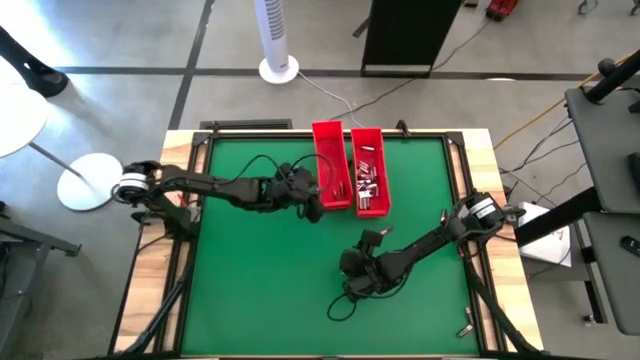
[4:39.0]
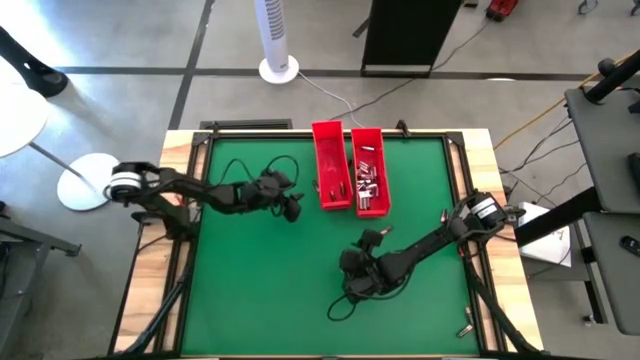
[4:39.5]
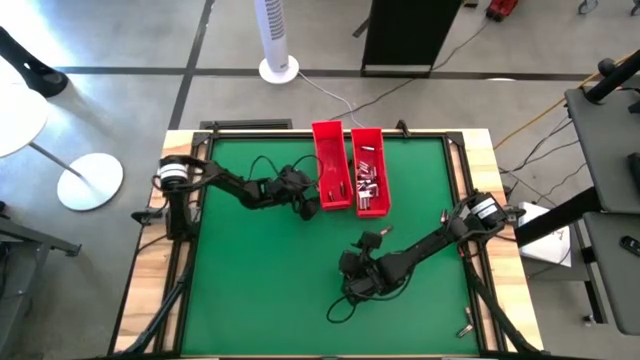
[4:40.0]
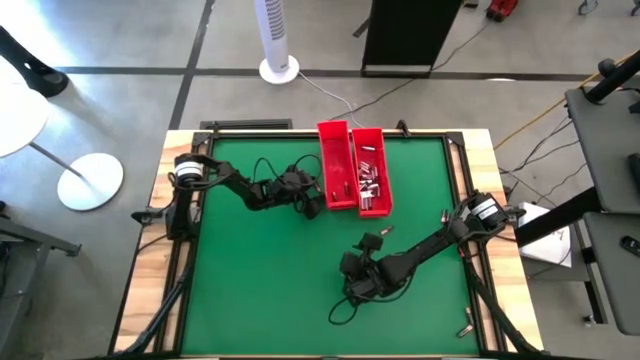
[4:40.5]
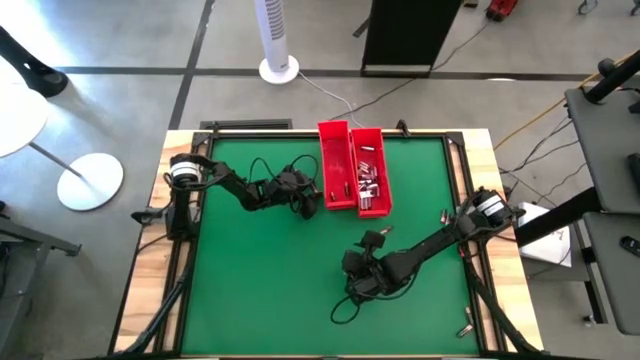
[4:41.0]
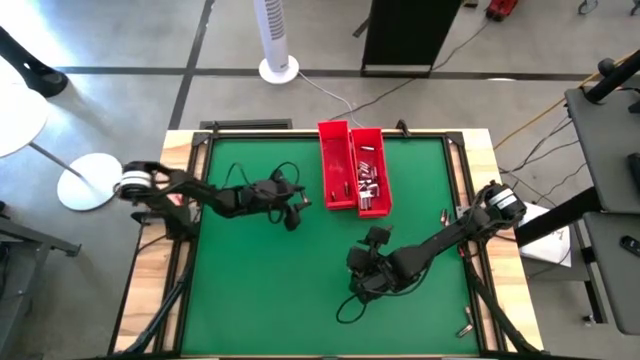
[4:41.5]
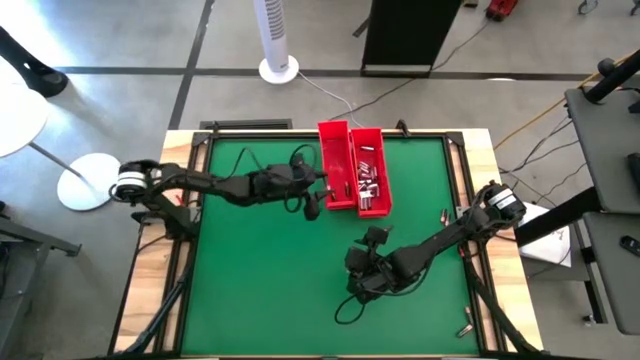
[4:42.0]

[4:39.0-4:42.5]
Task: Sort batteries
Put the black battery into the left red bin

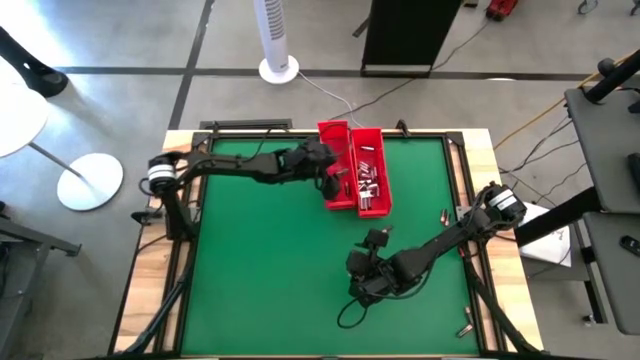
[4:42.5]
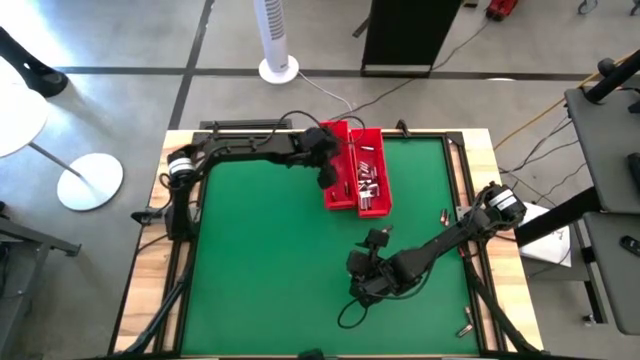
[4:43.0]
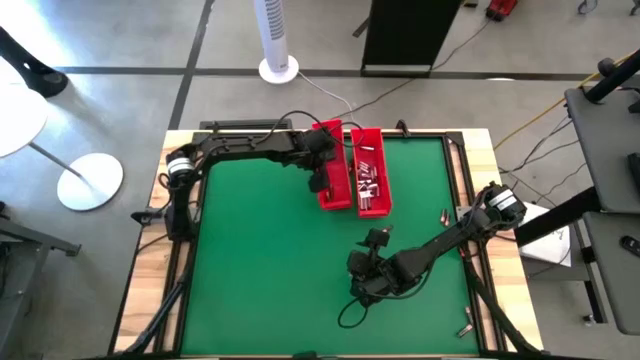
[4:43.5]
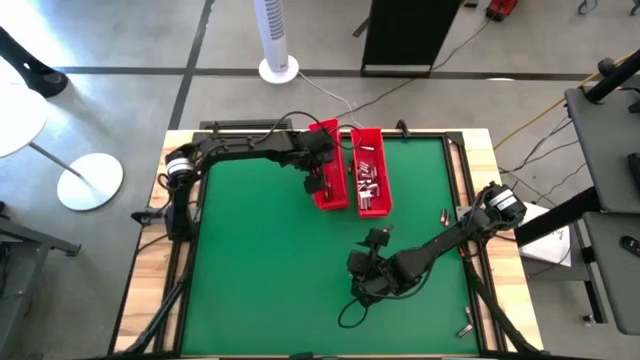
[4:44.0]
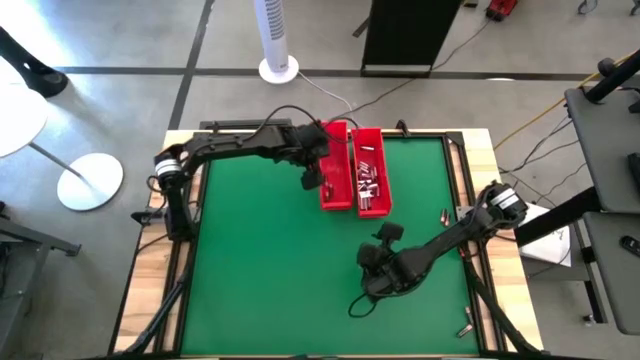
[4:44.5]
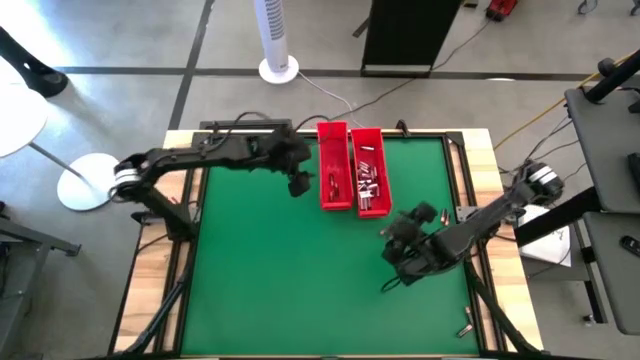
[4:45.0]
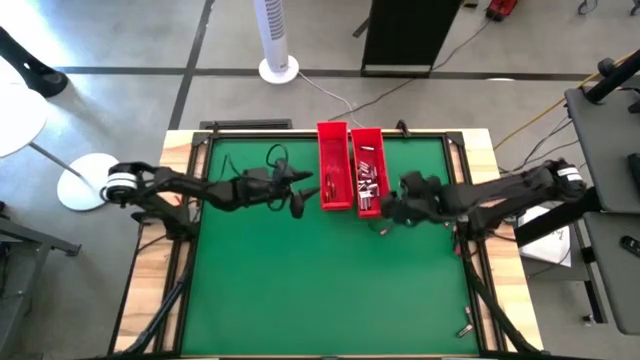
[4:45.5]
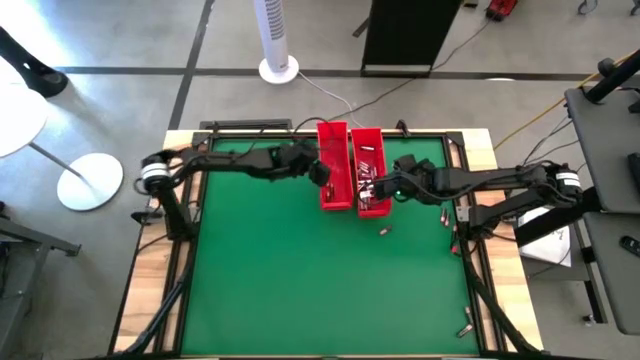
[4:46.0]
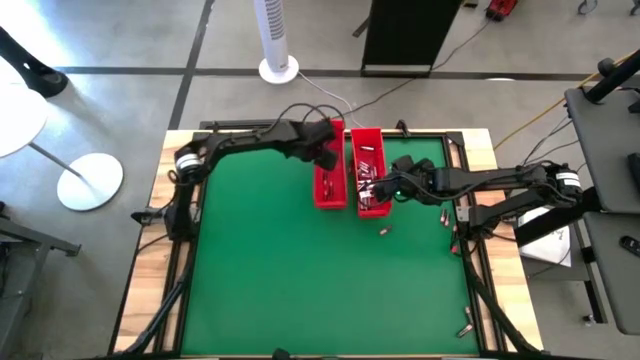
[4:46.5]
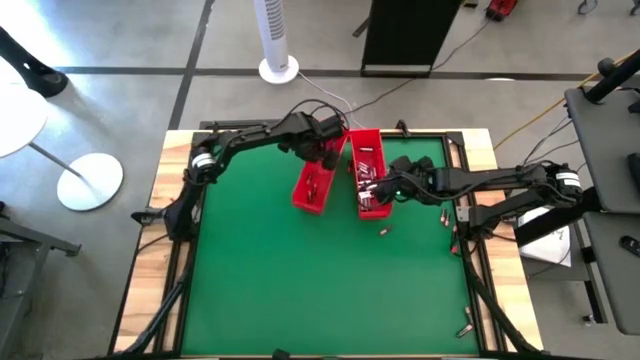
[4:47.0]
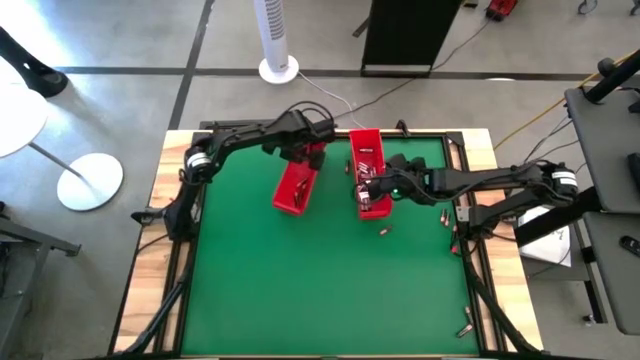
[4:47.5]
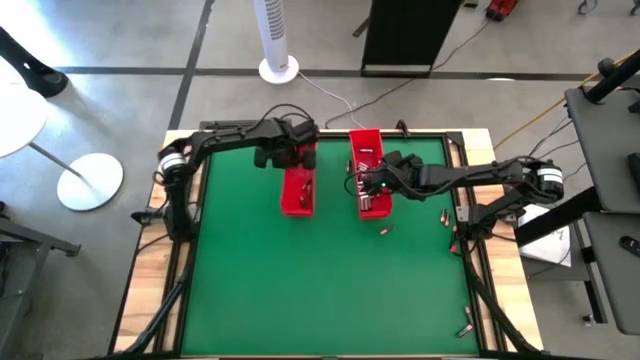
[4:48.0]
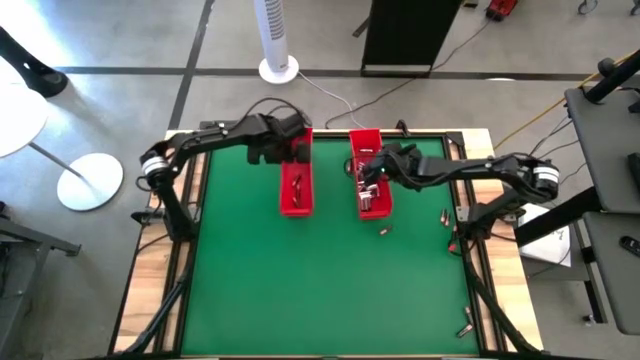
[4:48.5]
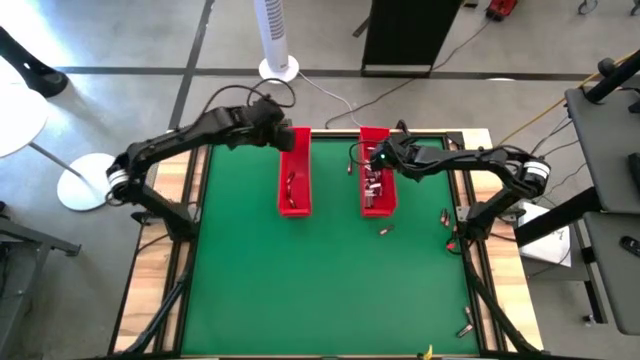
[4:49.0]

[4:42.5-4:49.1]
Adjust the bins

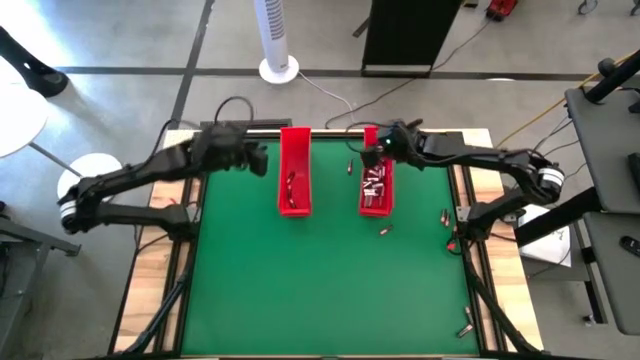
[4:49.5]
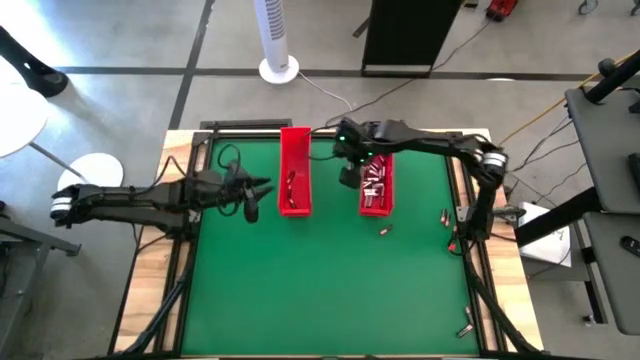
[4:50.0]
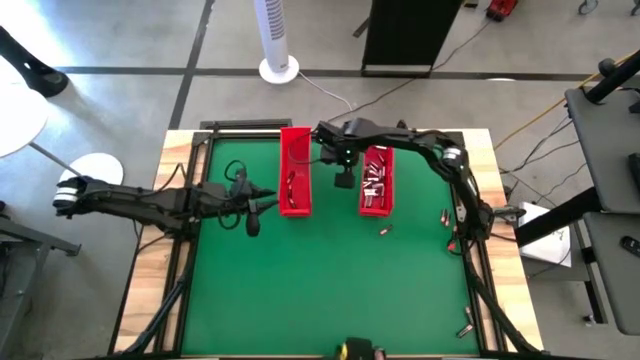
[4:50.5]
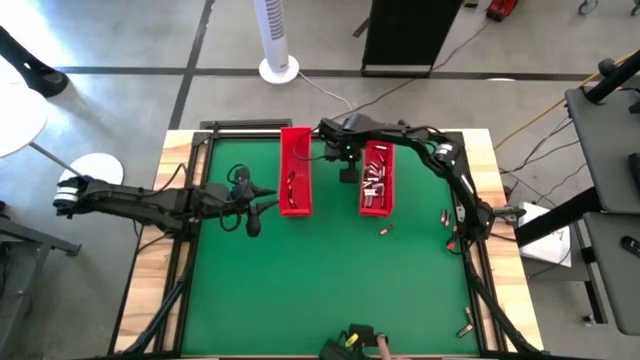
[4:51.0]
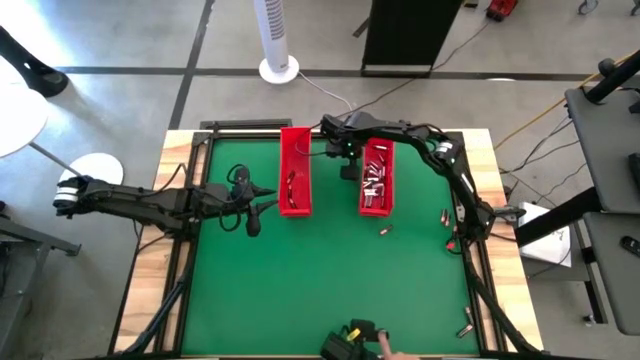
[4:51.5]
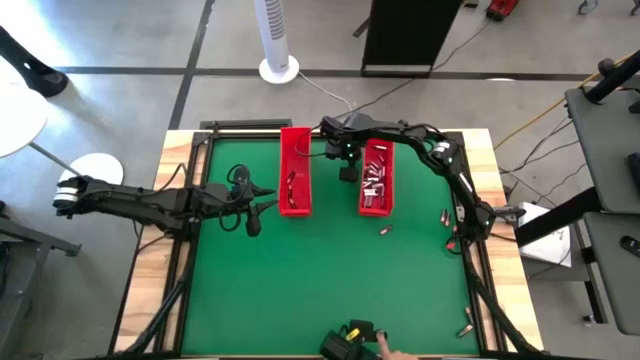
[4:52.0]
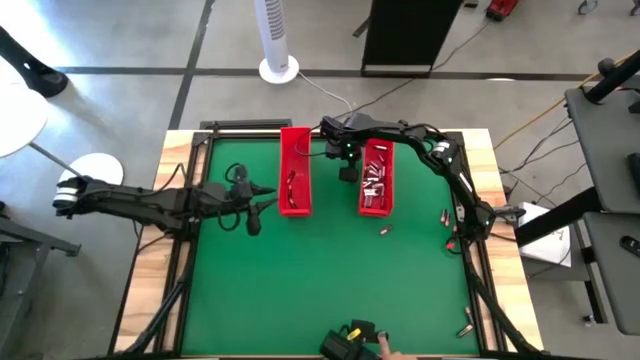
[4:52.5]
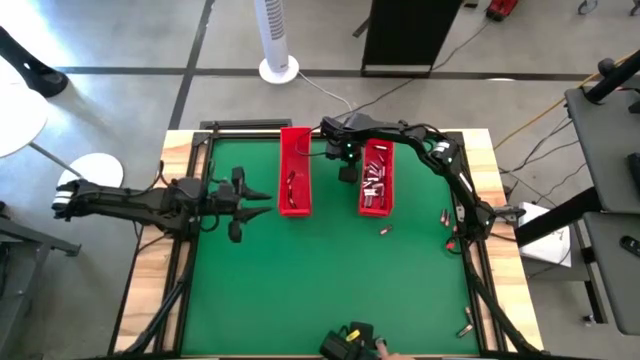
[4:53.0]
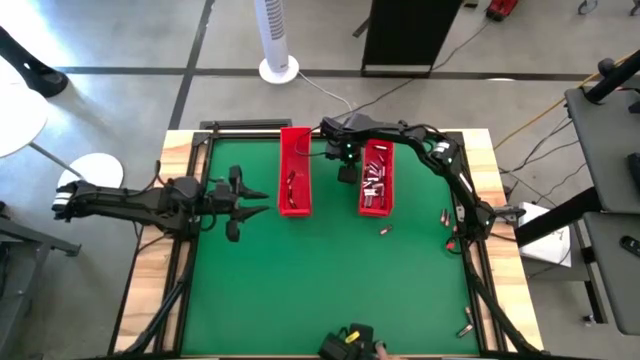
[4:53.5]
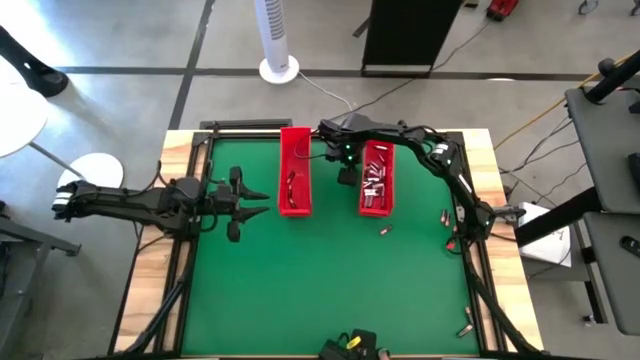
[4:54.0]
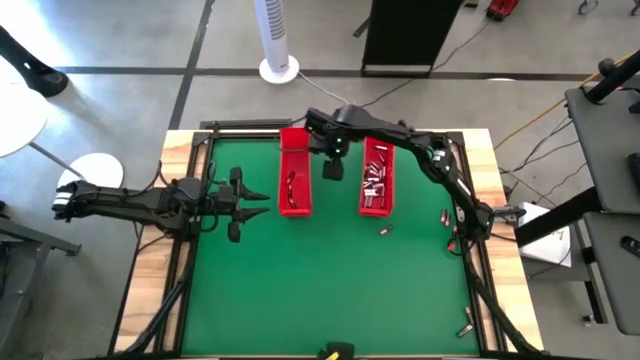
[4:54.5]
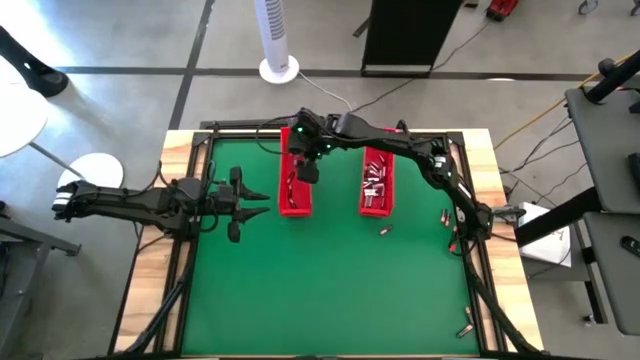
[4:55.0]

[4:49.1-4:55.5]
Put the black battery into the left red bin

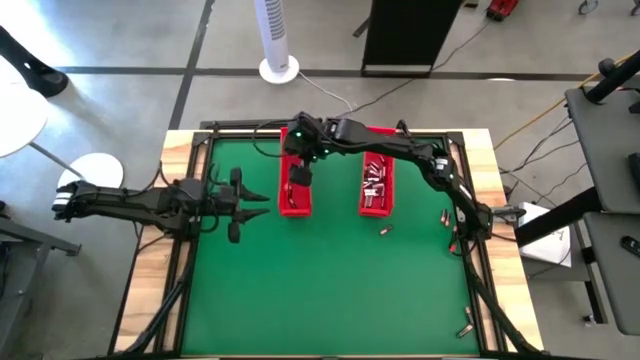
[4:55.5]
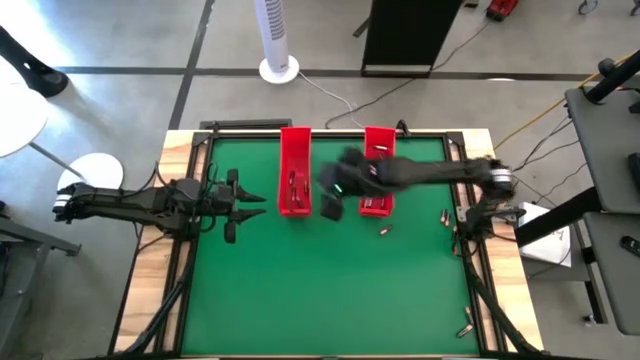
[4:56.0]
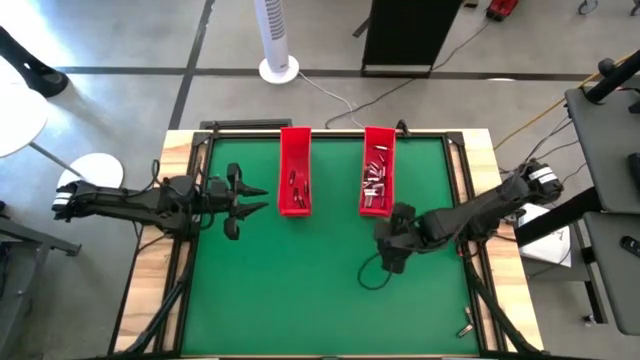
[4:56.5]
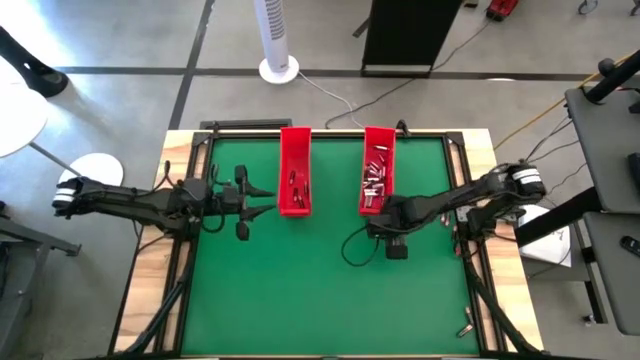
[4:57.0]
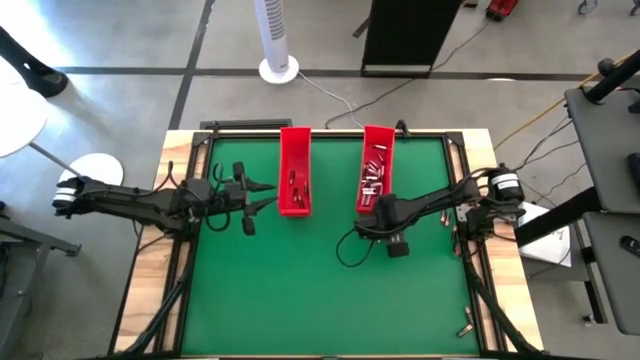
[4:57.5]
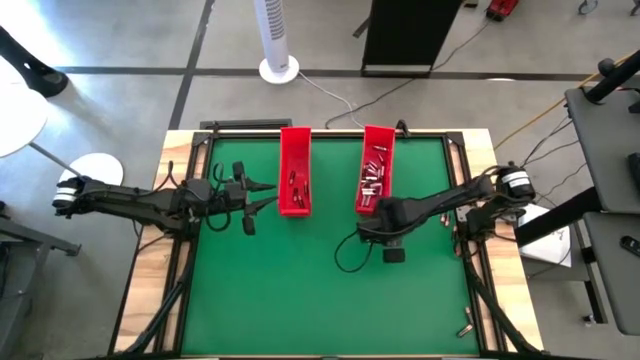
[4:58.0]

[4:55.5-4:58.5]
Put the black battery into the left red bin

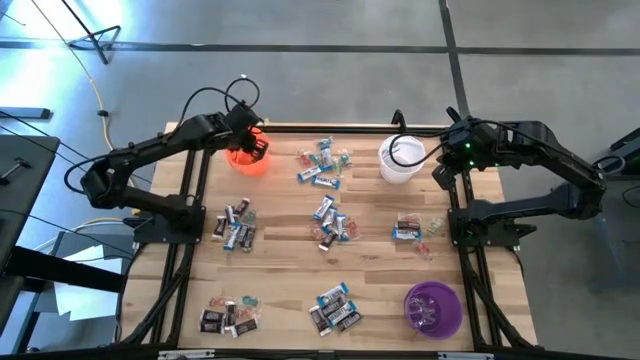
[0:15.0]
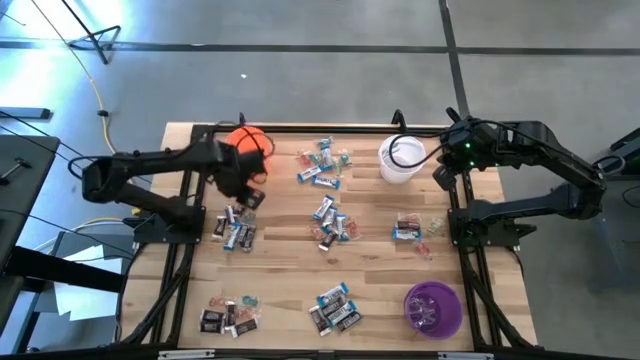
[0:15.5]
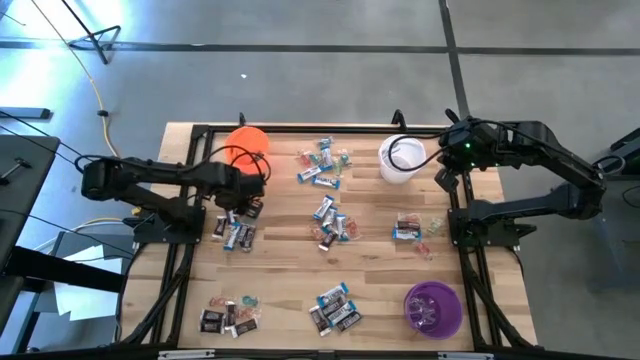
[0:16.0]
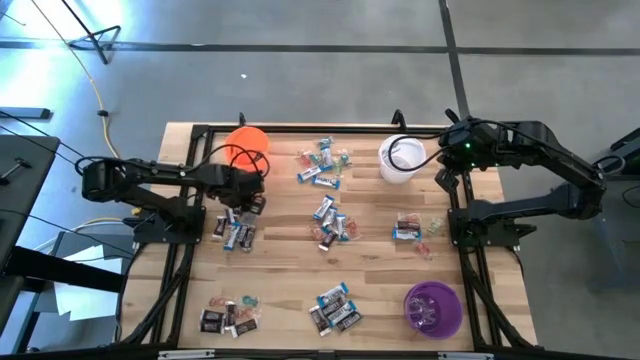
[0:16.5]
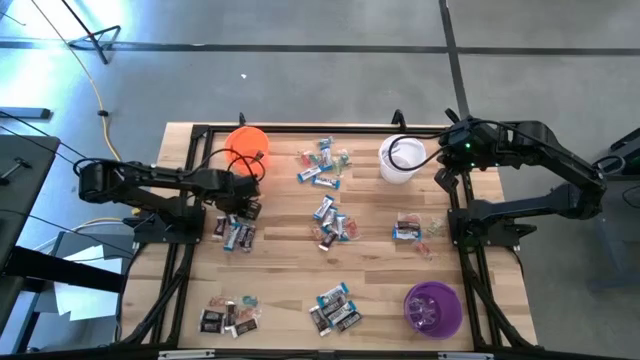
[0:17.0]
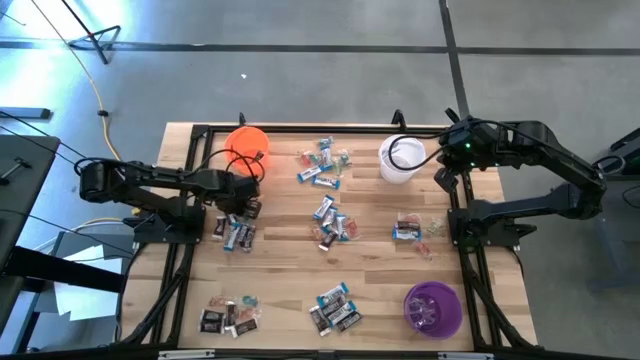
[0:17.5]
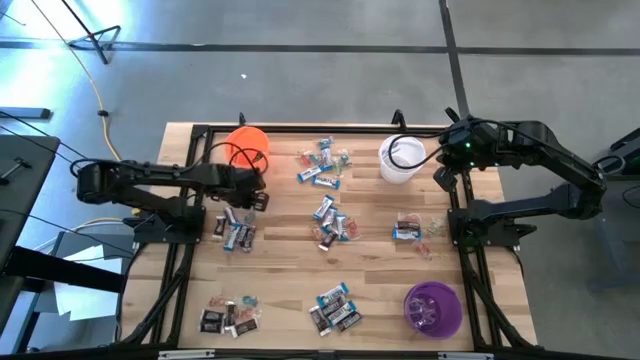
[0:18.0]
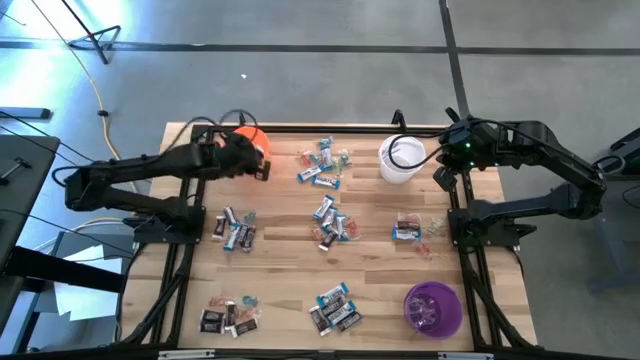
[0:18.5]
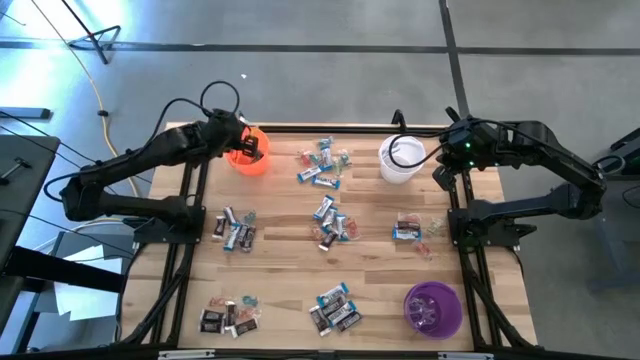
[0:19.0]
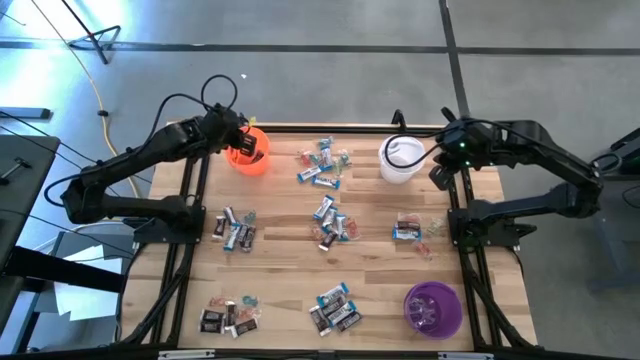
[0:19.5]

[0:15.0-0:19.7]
Task: Sort candy
Put the brown chocolate into the orange bucket
